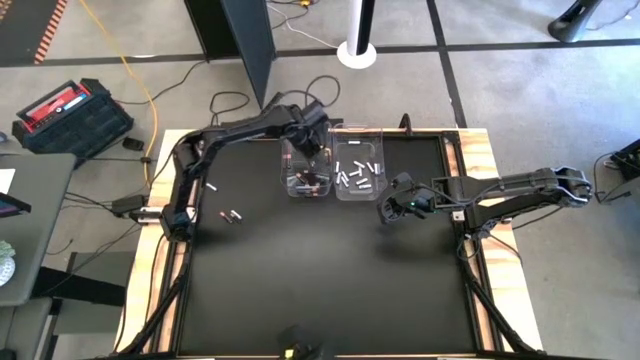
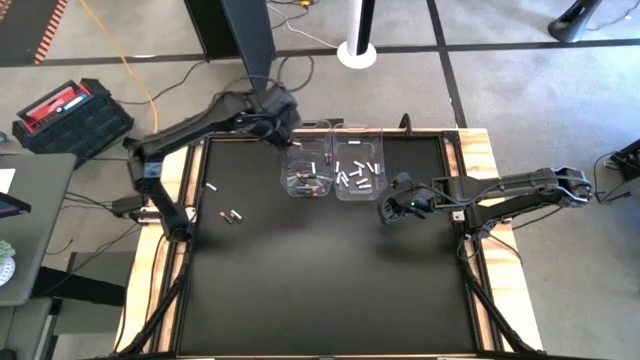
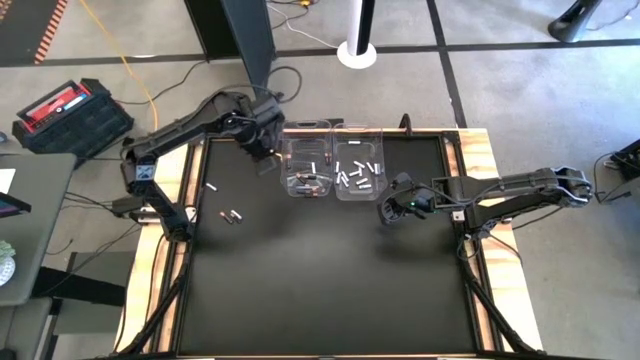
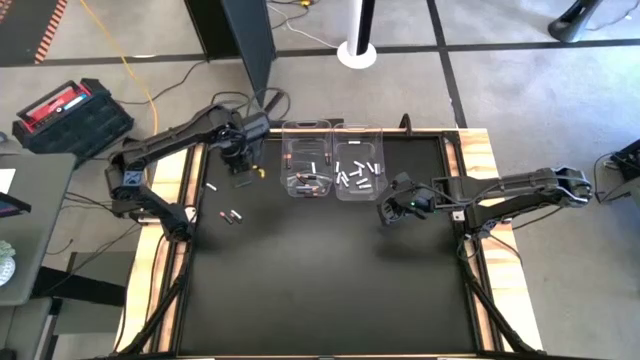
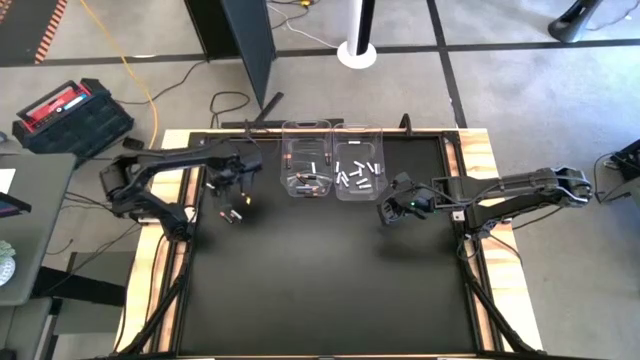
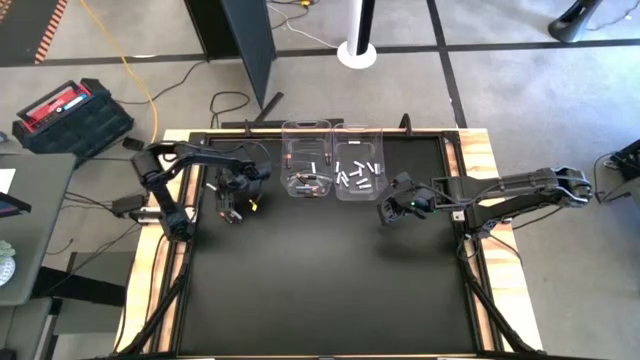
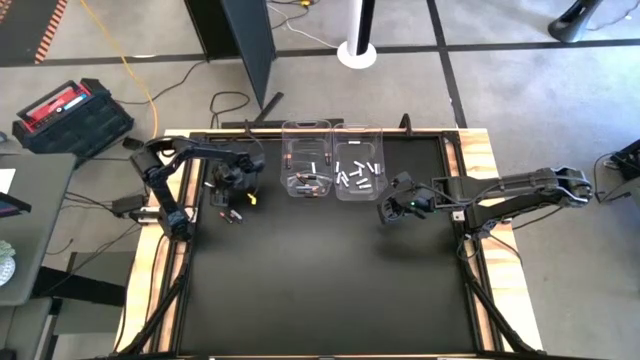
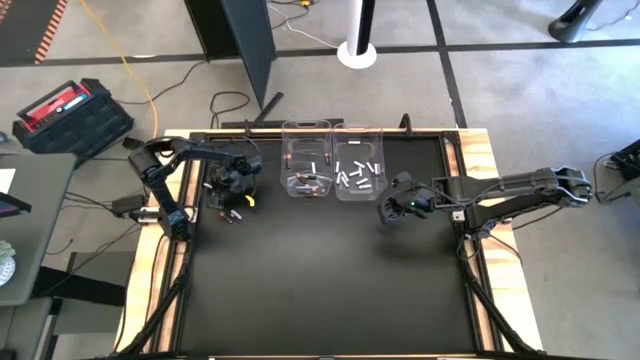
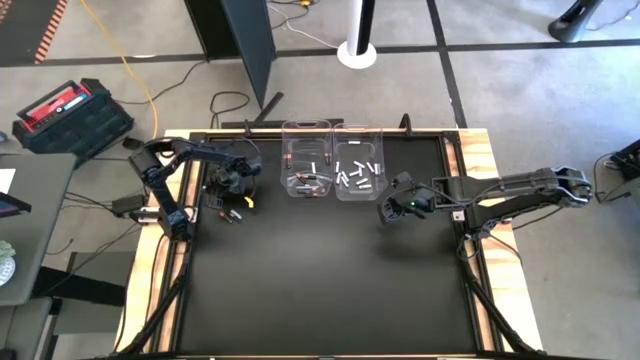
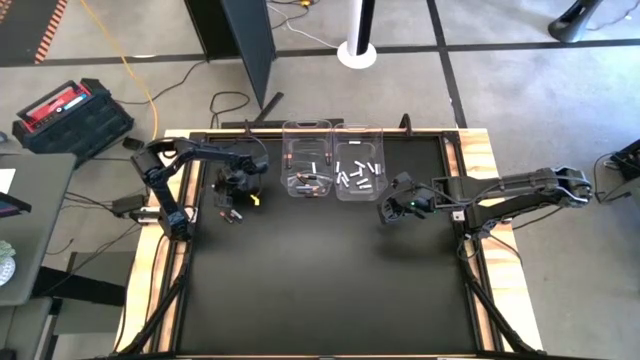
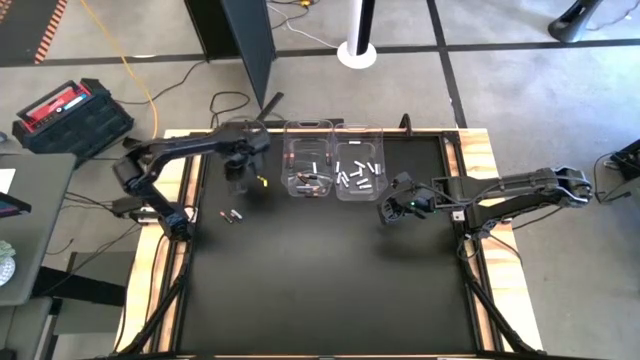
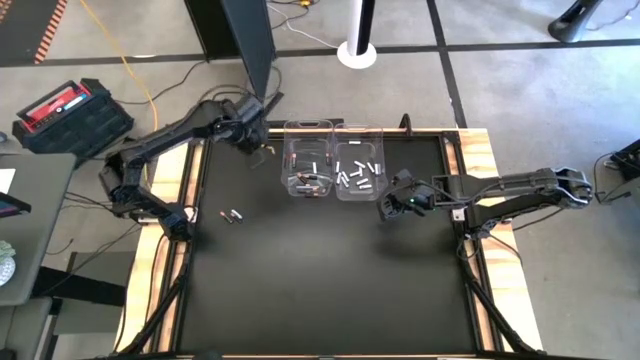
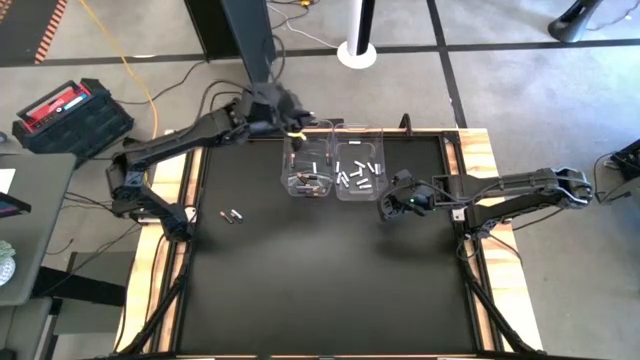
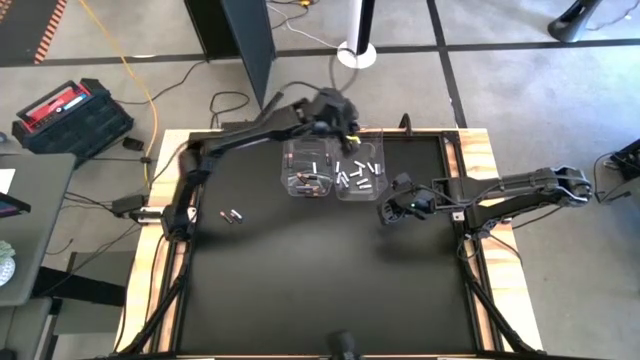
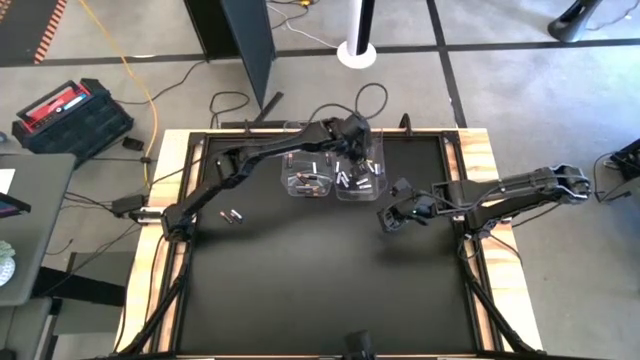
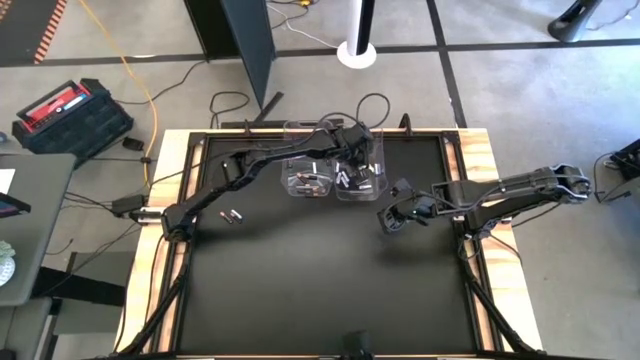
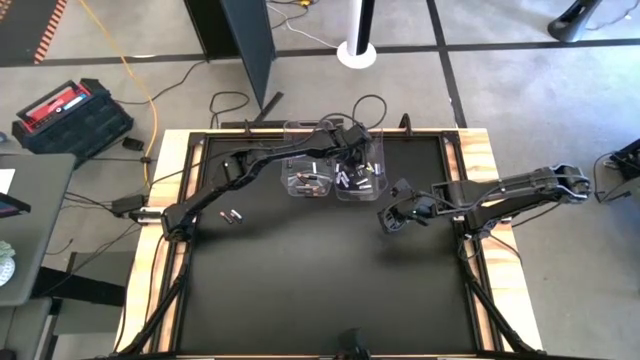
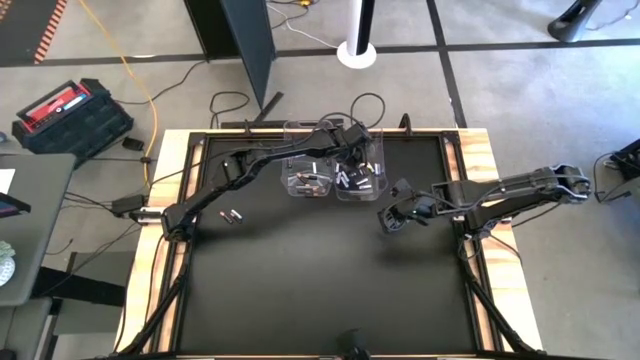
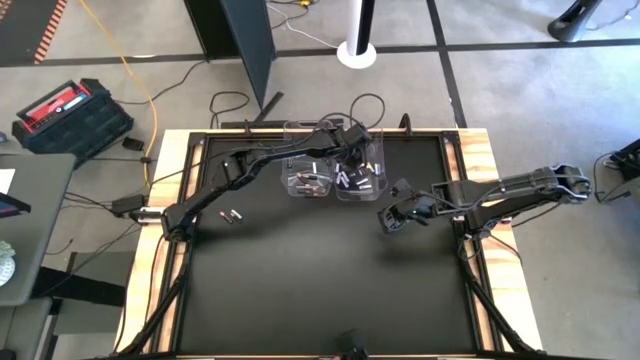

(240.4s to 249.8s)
Task: Sort batteries
Put the white battery into the right transparent bin

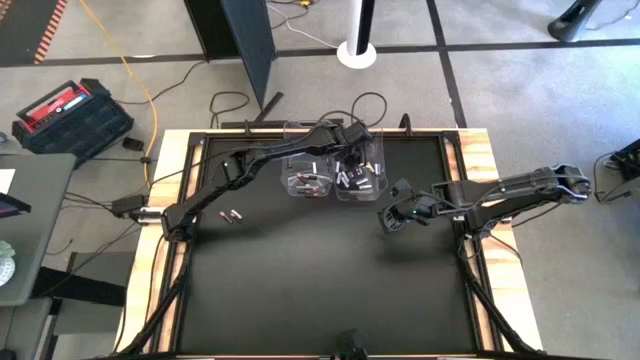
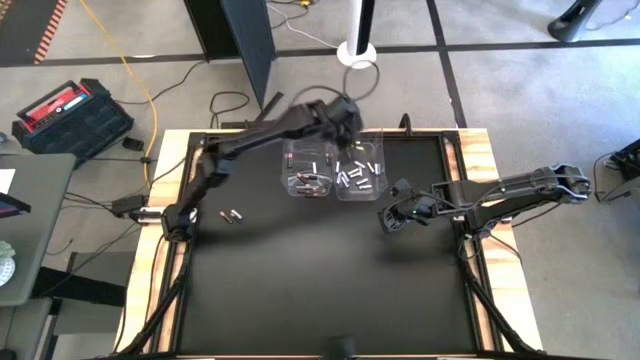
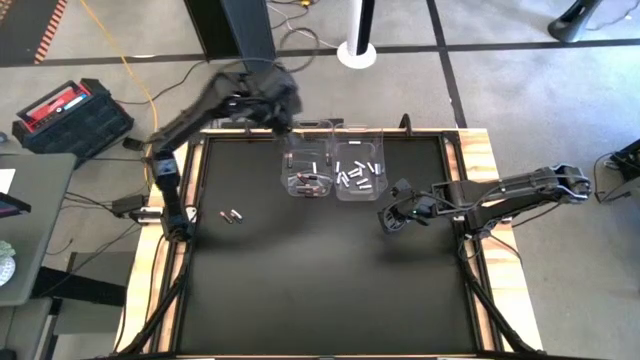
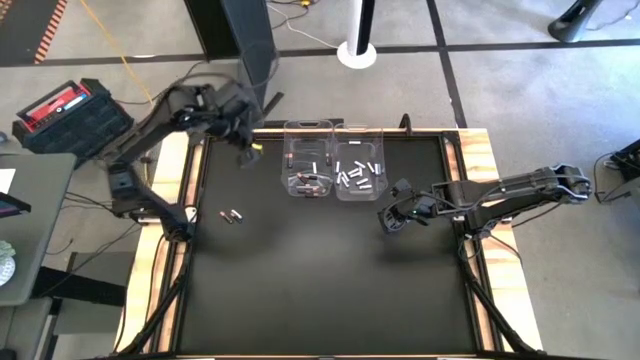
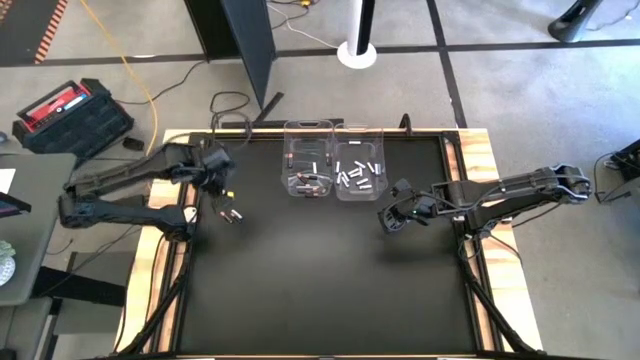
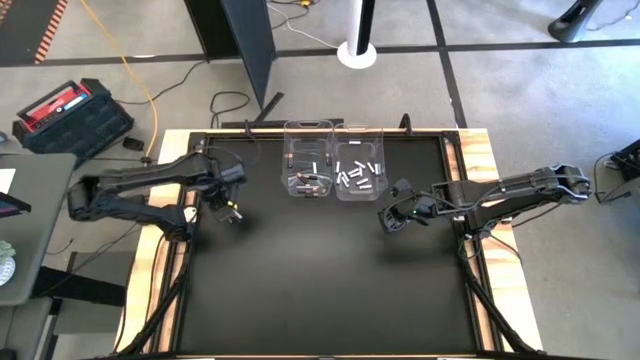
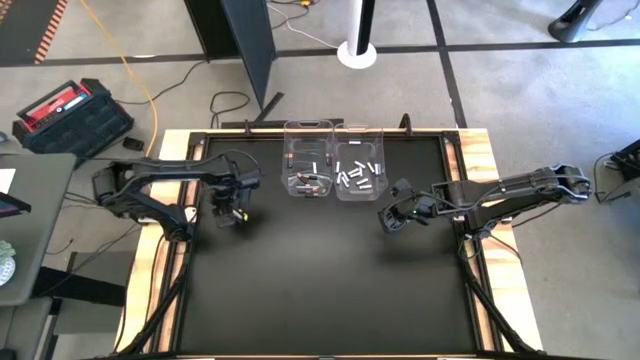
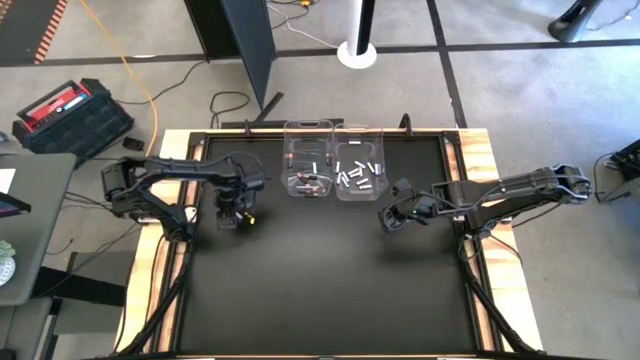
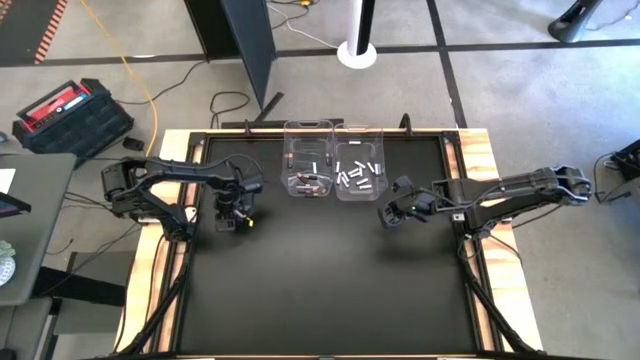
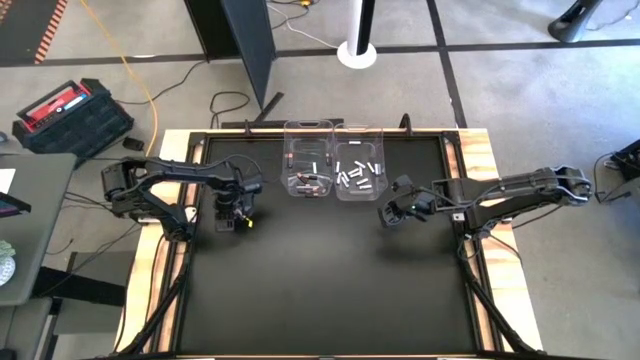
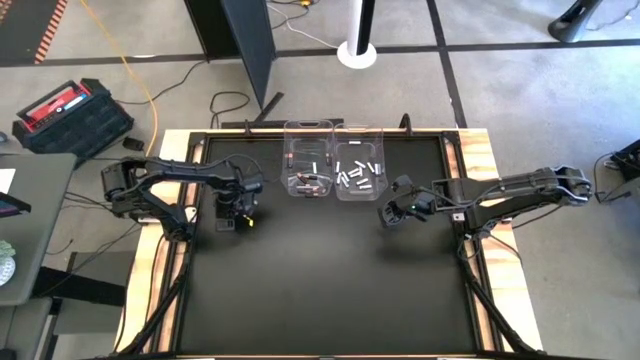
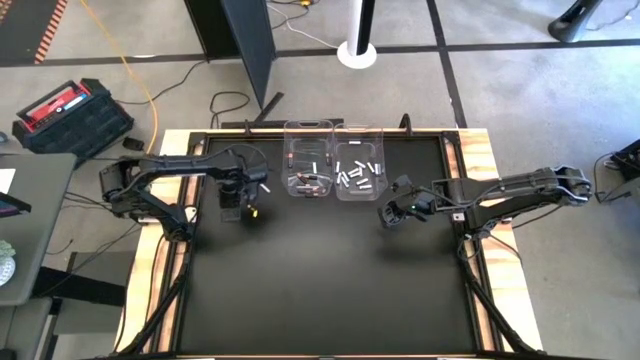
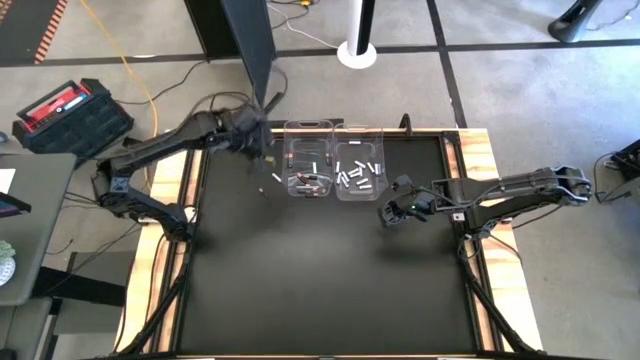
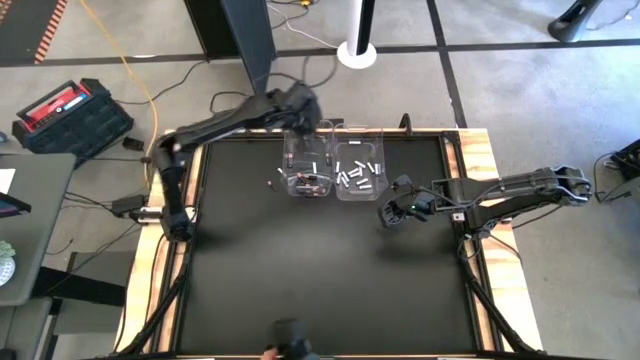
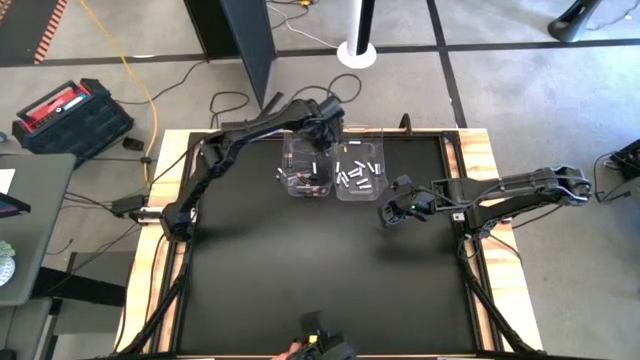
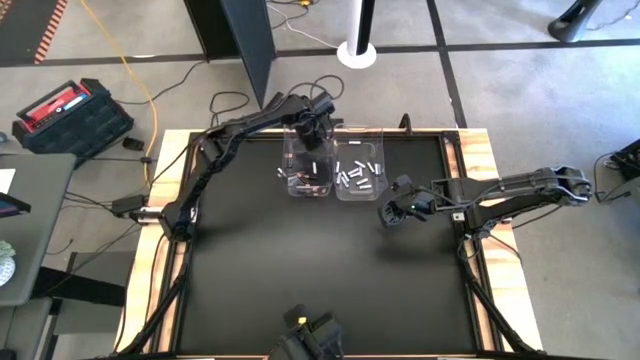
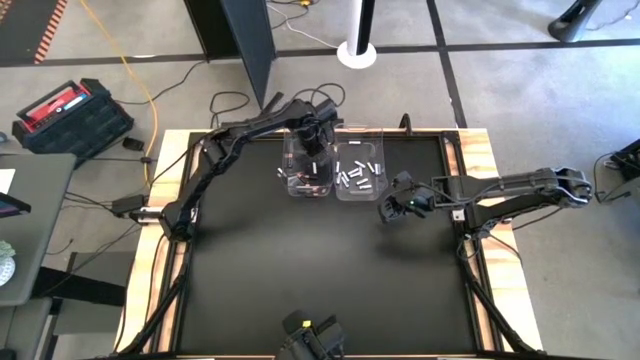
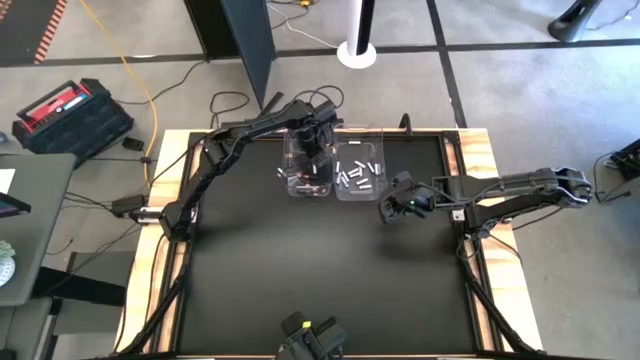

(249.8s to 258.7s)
Put the black battery into the left transparent bin

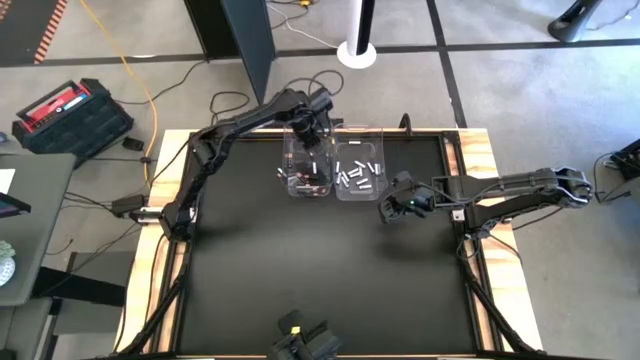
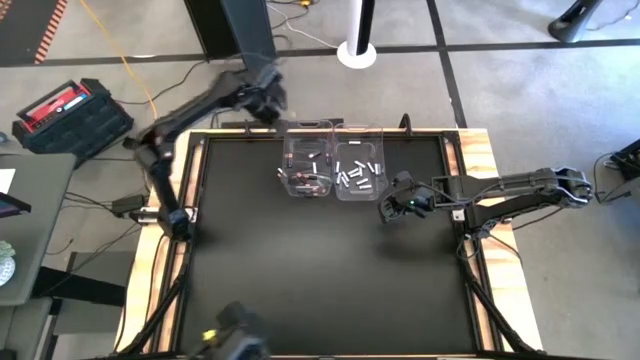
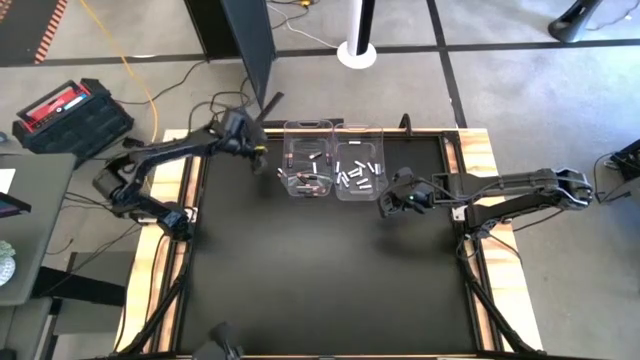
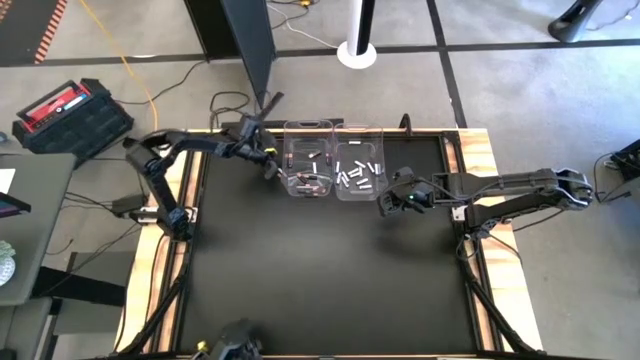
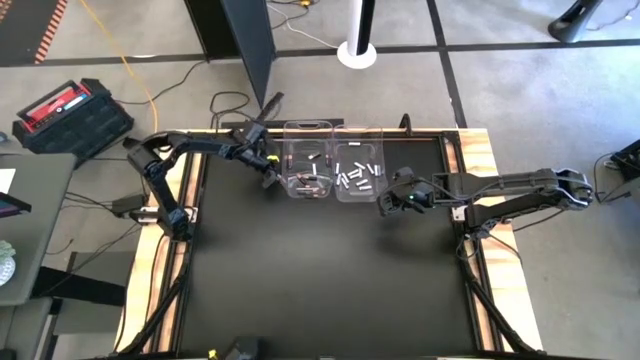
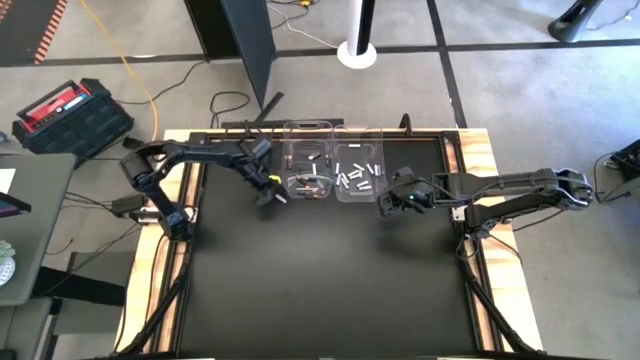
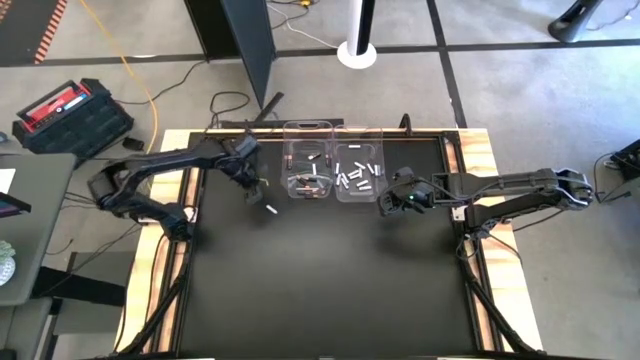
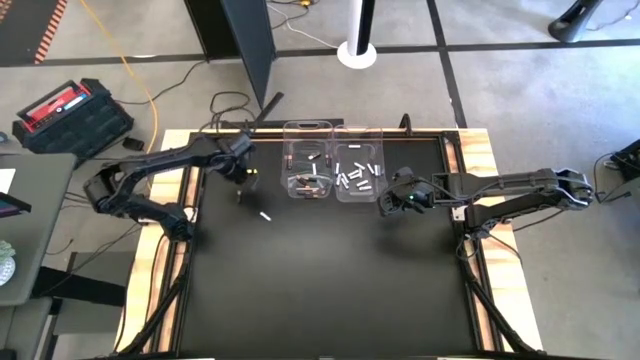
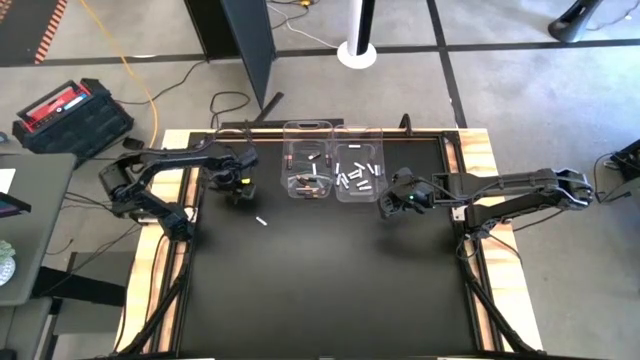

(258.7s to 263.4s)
Put the black battery into the left transparent bin
